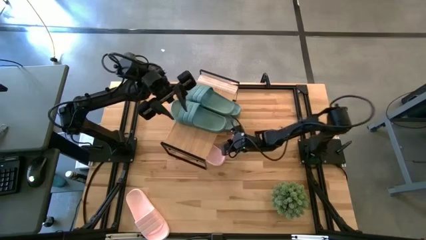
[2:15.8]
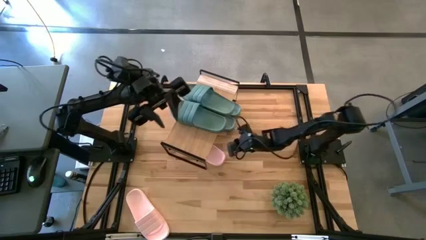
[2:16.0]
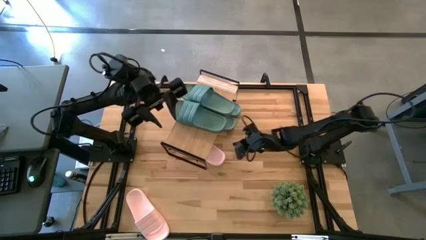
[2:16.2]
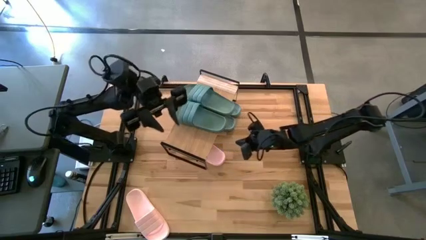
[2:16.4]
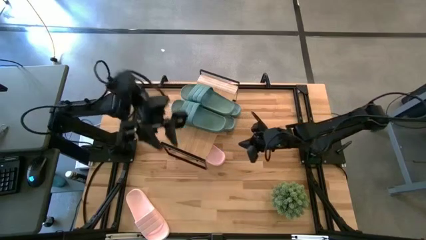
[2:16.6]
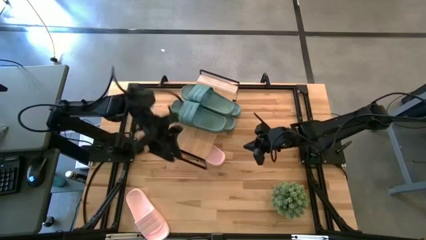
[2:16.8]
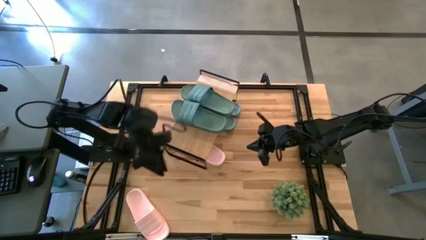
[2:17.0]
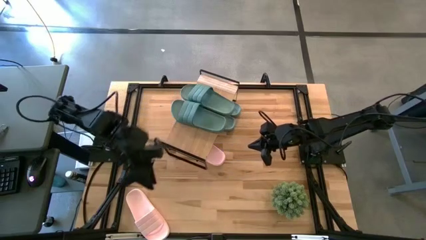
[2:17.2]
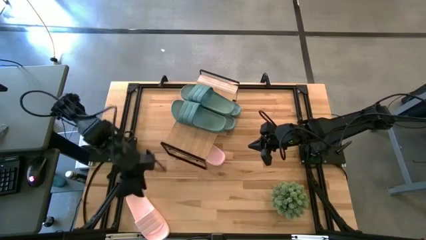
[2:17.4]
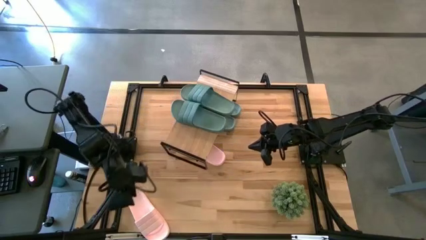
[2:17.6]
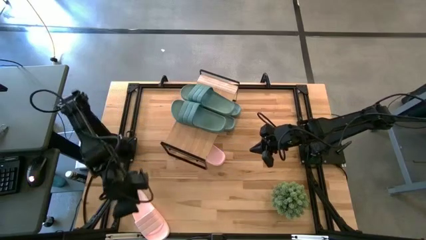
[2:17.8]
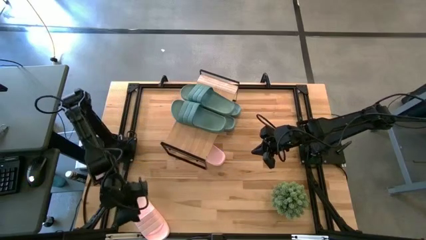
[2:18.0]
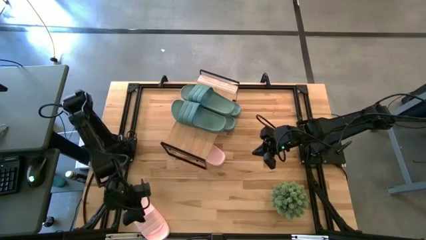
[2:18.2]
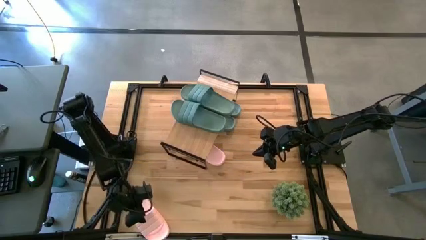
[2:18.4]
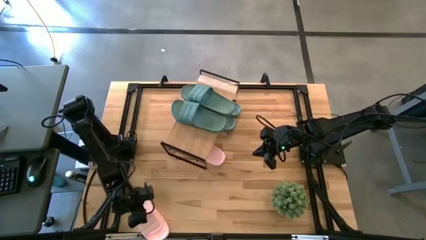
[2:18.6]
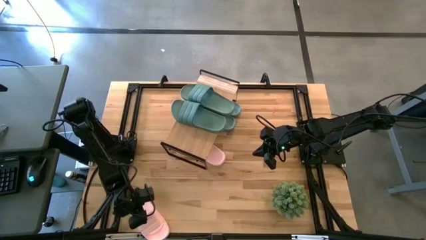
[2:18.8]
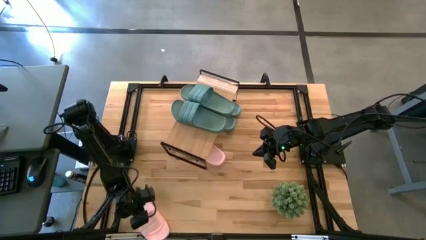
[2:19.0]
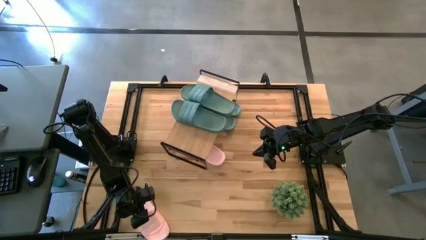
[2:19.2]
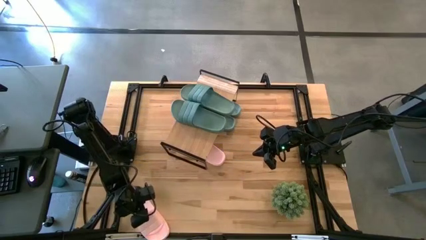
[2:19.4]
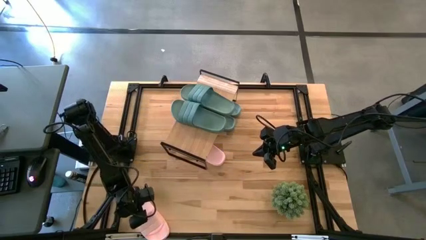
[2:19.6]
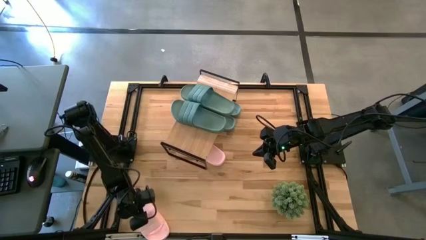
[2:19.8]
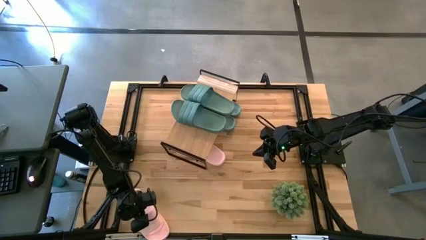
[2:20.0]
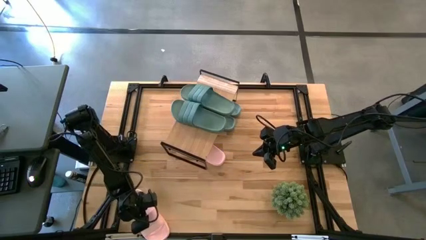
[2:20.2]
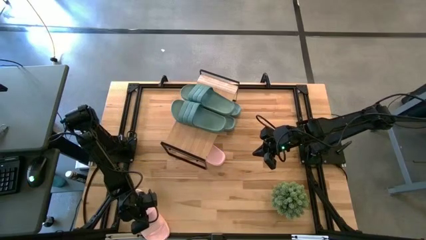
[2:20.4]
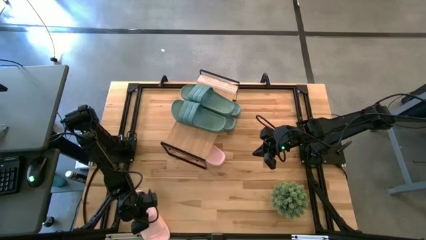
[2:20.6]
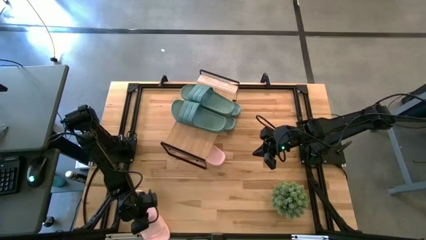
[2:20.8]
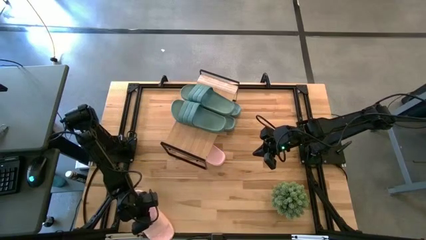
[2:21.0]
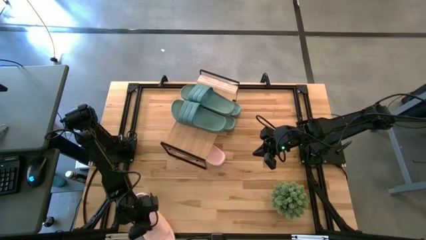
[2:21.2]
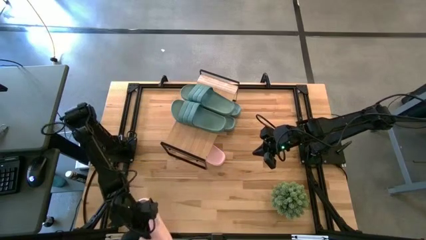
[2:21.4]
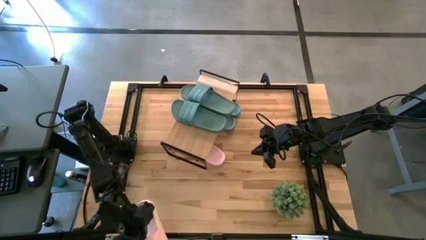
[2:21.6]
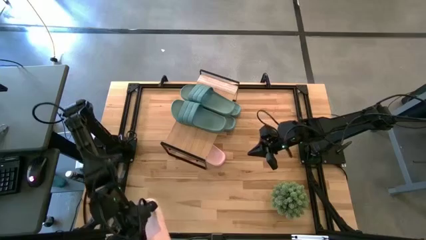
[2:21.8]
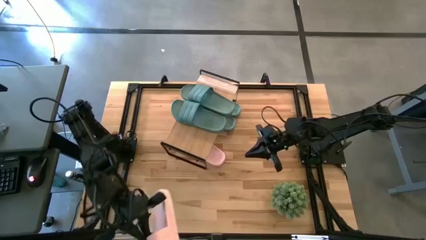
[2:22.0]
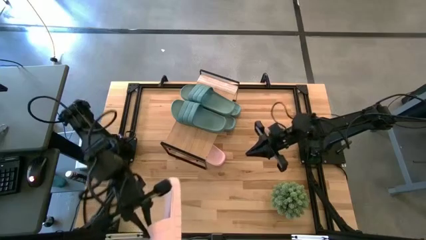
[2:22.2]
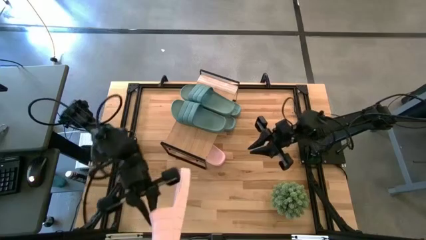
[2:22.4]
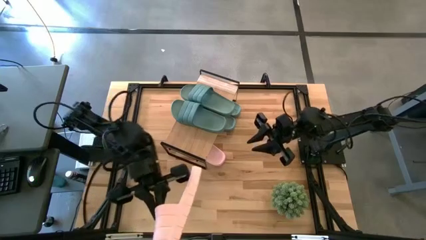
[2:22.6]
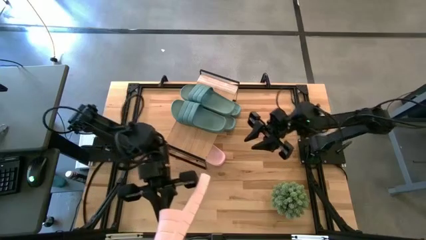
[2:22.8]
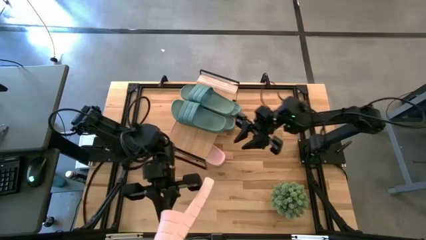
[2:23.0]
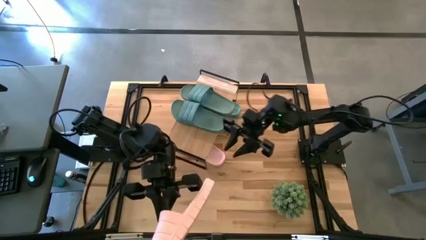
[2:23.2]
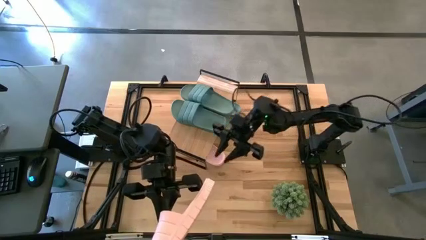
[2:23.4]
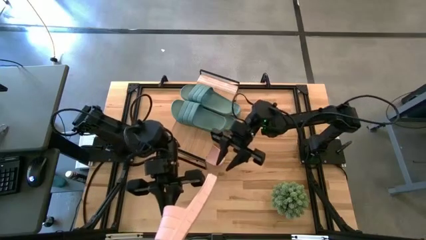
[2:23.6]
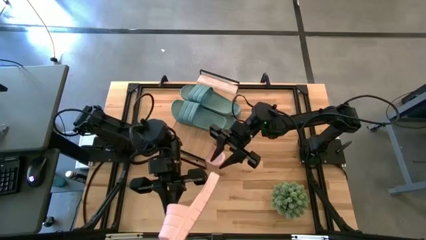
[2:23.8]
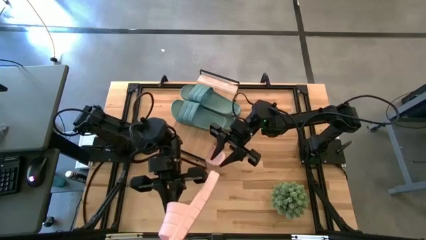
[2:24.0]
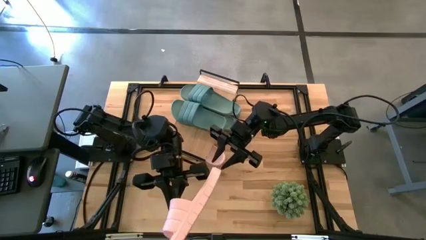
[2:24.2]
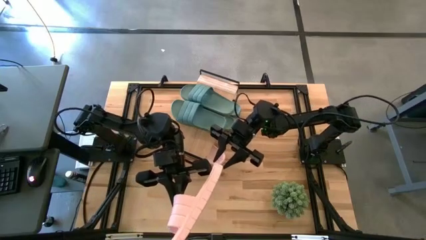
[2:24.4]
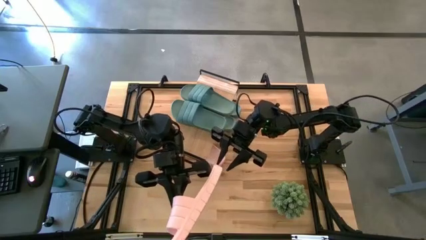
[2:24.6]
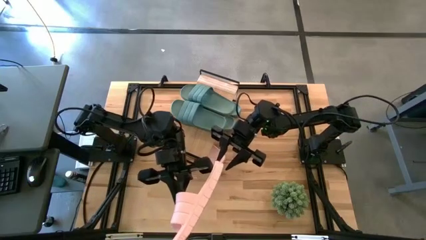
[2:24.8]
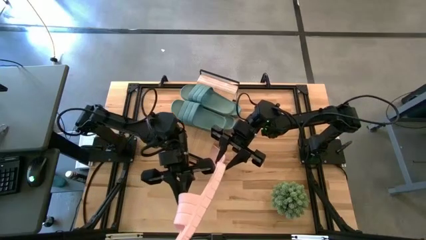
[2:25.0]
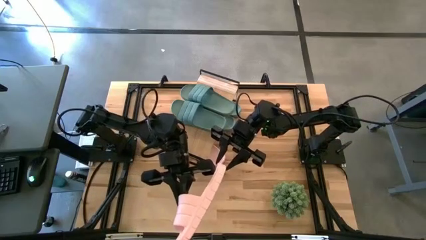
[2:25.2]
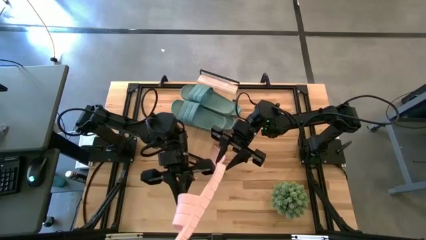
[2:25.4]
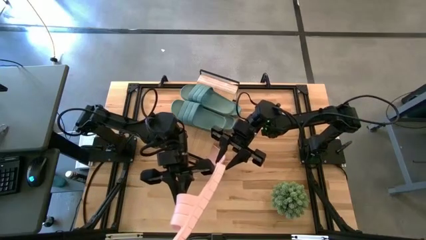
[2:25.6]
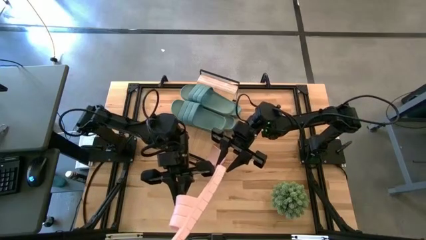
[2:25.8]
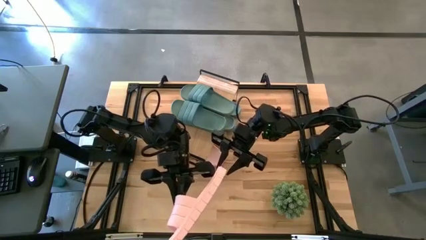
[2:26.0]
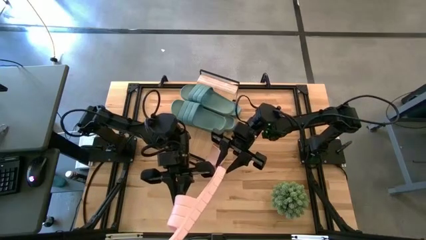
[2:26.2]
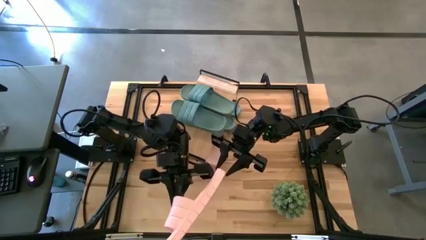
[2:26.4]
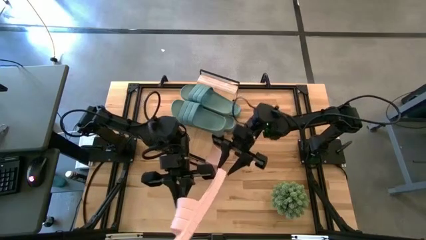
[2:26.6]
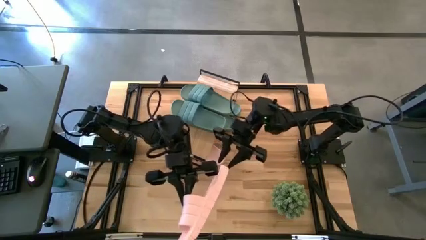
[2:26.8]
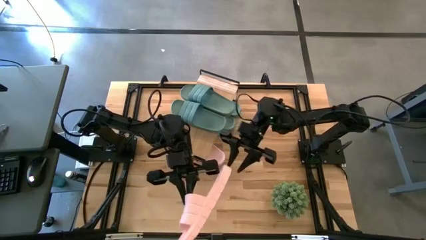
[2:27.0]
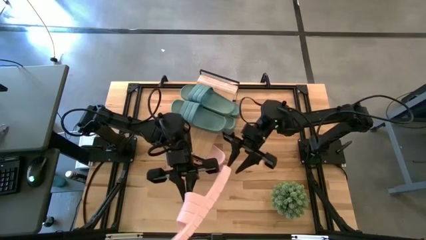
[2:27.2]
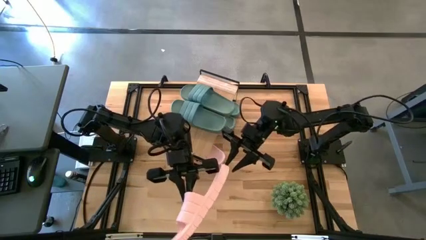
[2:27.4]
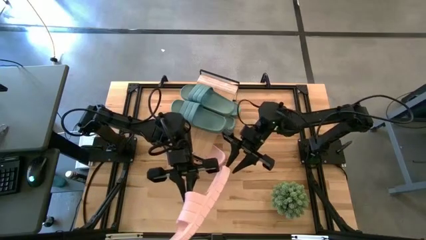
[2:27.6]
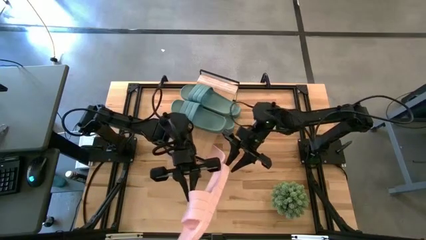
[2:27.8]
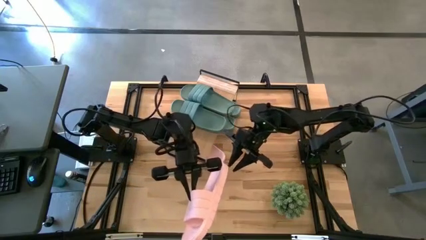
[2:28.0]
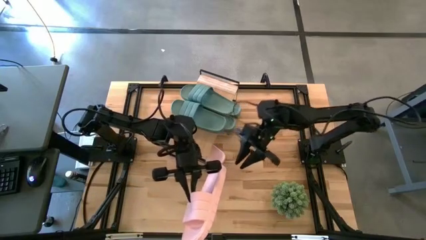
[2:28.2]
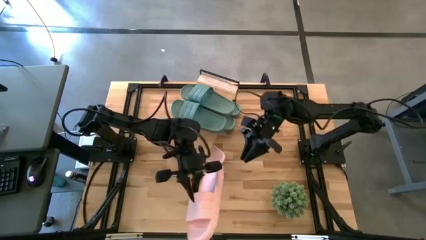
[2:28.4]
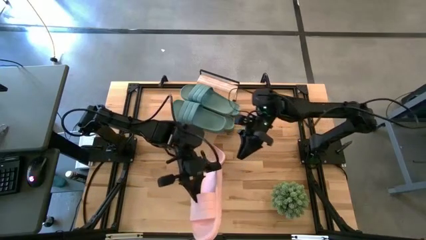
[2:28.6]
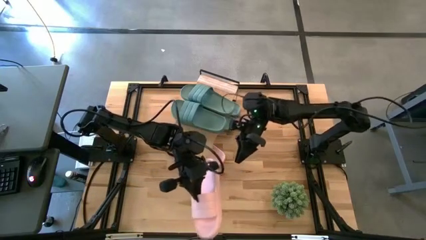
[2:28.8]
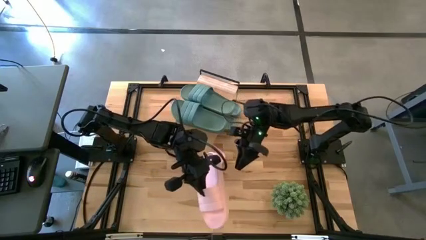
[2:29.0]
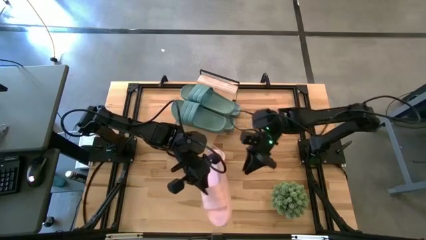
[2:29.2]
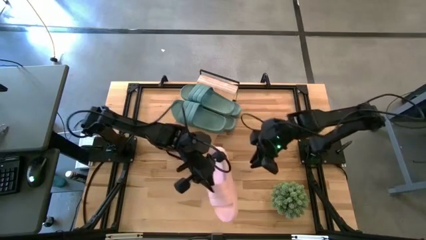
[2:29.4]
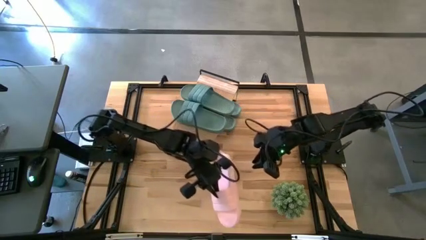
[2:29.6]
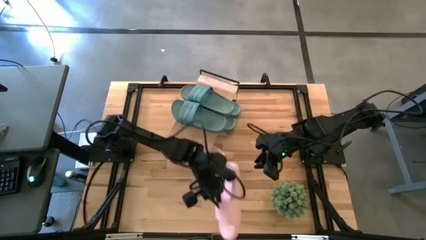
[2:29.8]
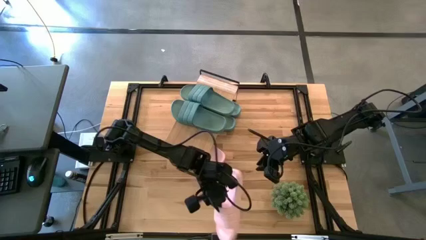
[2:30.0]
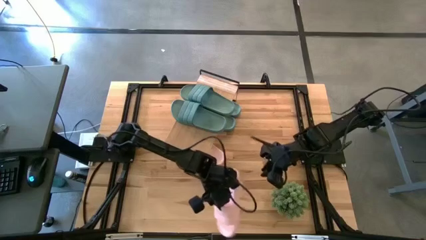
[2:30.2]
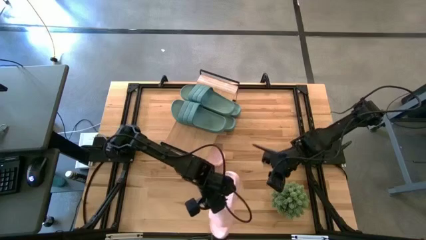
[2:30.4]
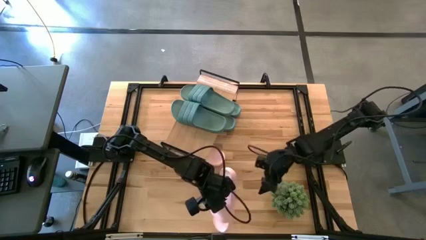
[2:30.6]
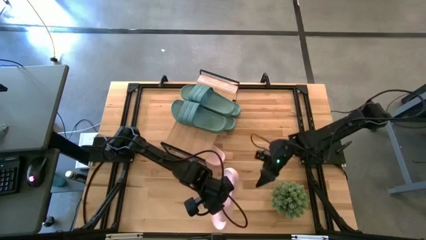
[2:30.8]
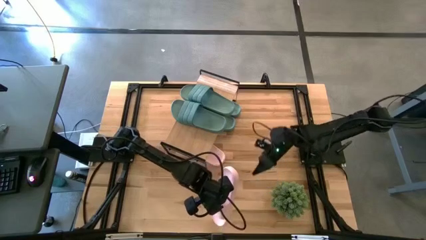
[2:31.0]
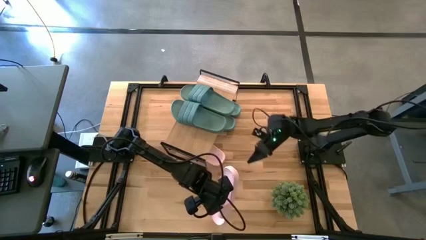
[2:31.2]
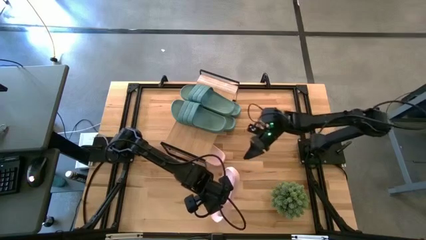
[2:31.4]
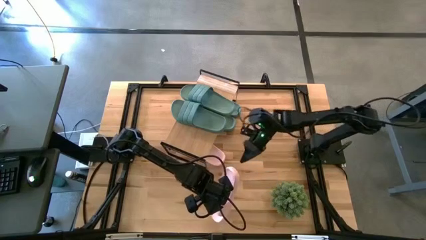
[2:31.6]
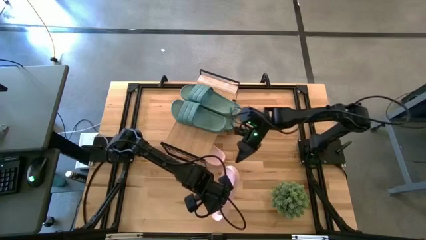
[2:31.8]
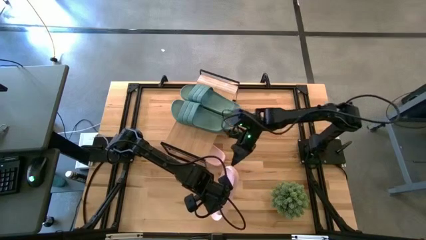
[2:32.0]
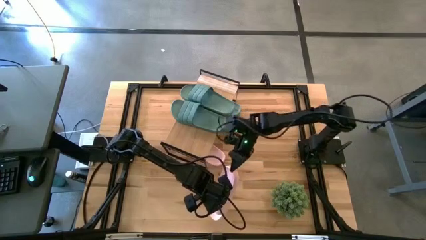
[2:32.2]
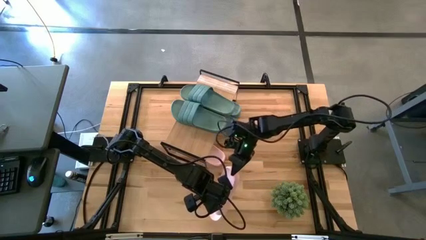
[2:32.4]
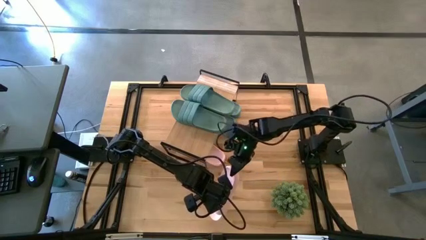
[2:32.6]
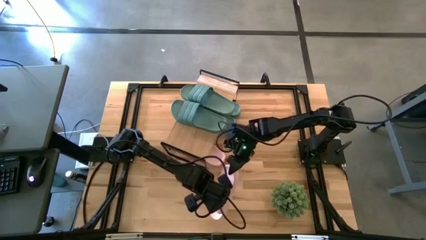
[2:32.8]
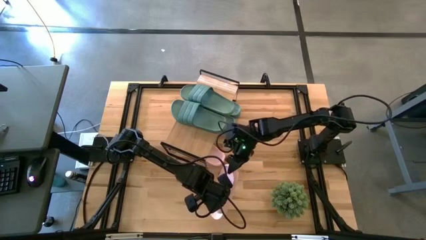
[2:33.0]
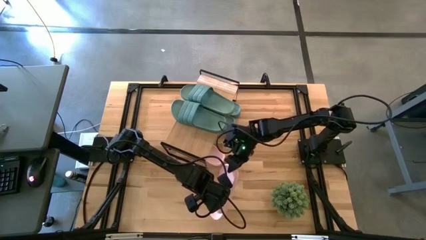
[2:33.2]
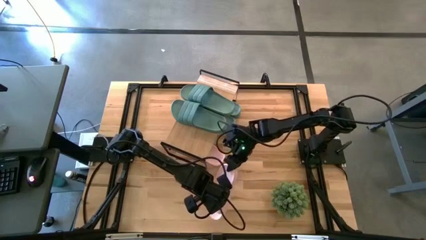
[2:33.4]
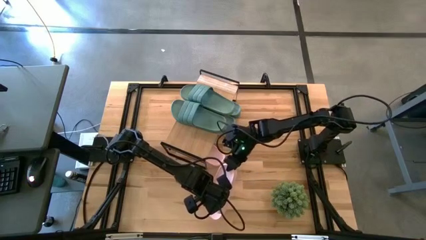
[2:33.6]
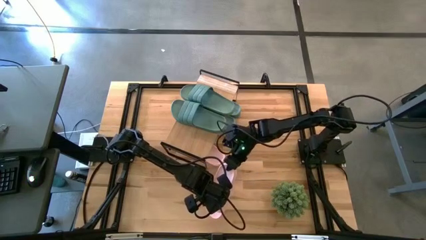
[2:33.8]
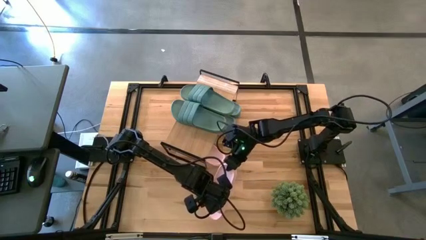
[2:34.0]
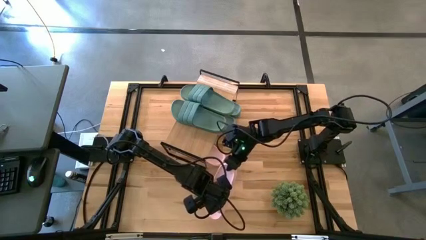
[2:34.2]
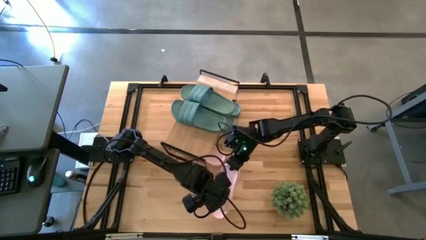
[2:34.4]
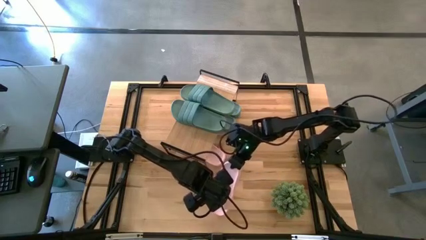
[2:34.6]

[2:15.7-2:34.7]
Task: Pick and place slides into the shelf
Put the pink slide on the shelf
